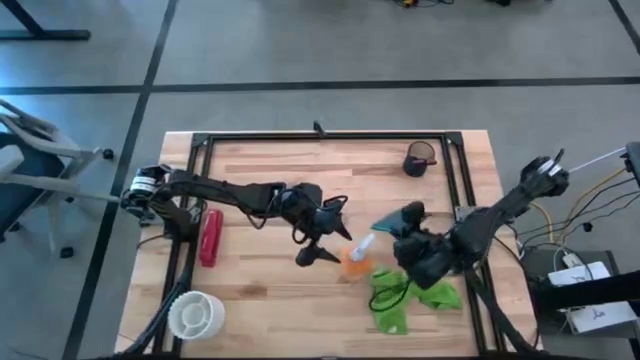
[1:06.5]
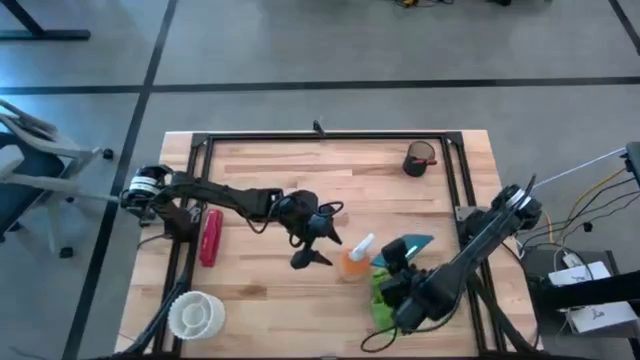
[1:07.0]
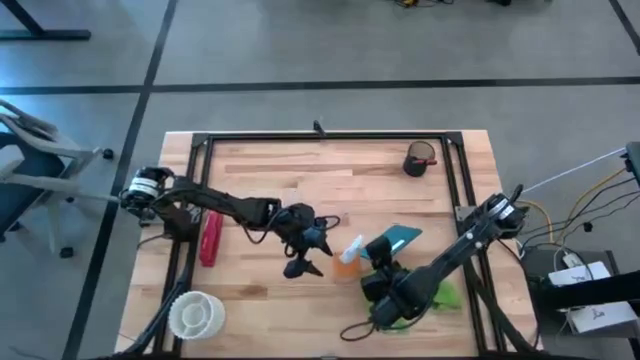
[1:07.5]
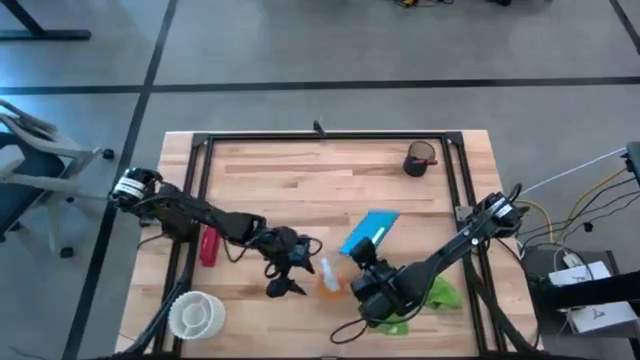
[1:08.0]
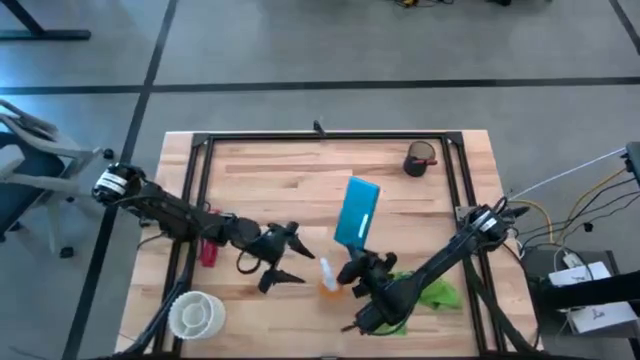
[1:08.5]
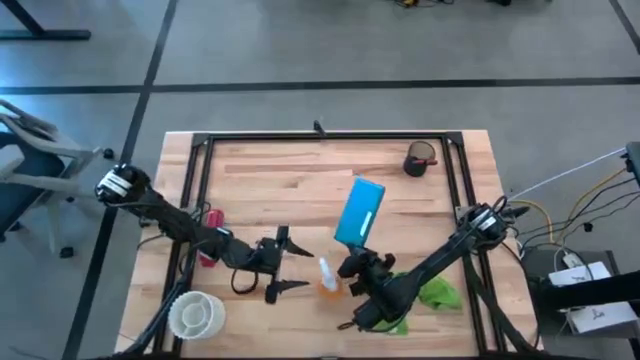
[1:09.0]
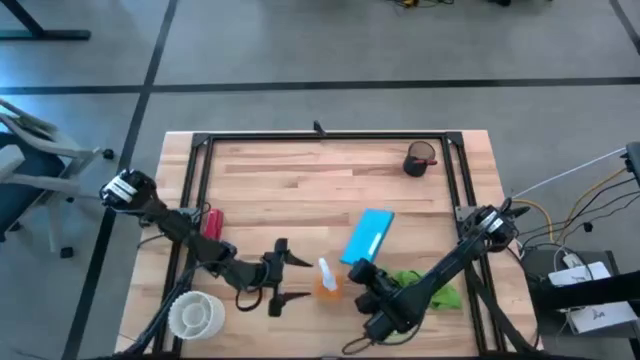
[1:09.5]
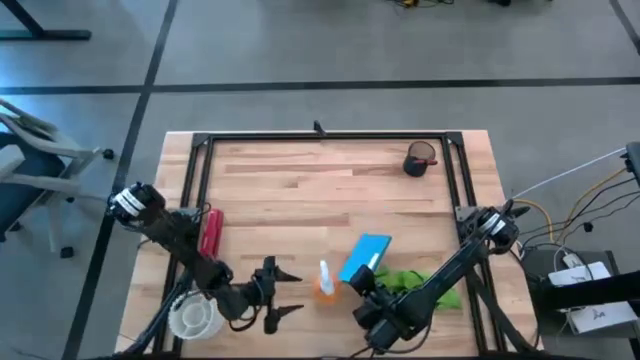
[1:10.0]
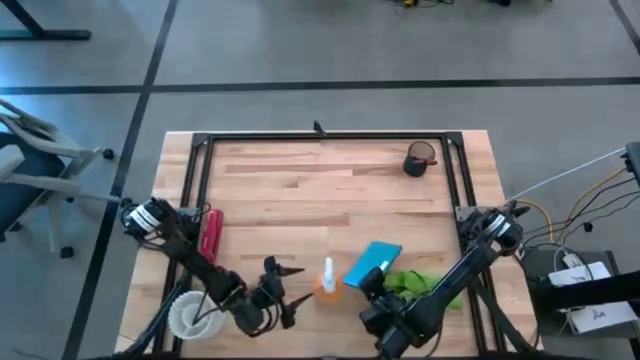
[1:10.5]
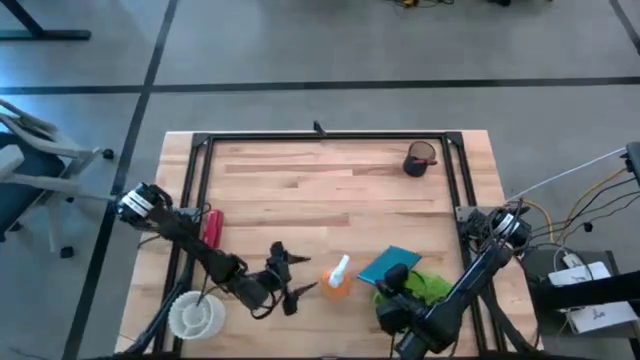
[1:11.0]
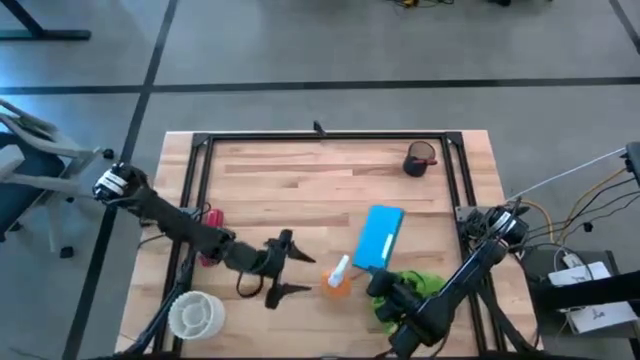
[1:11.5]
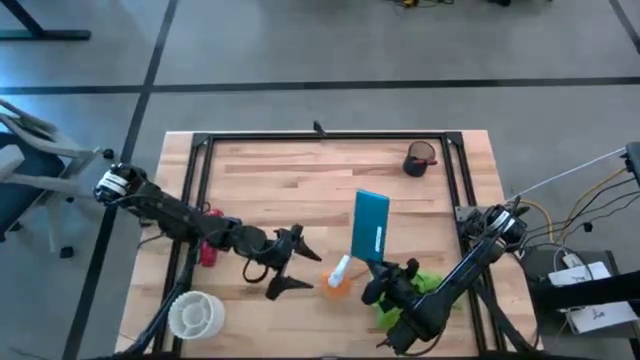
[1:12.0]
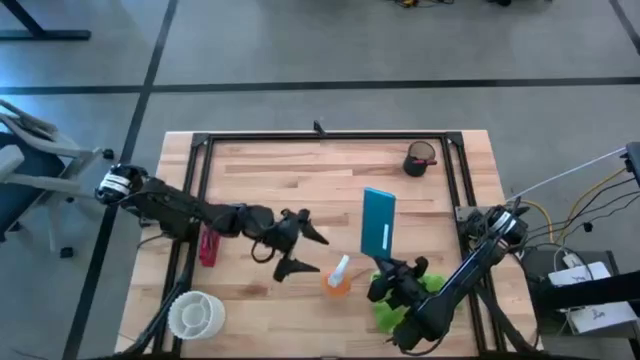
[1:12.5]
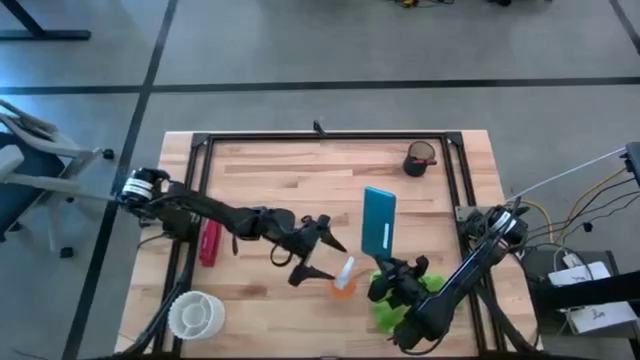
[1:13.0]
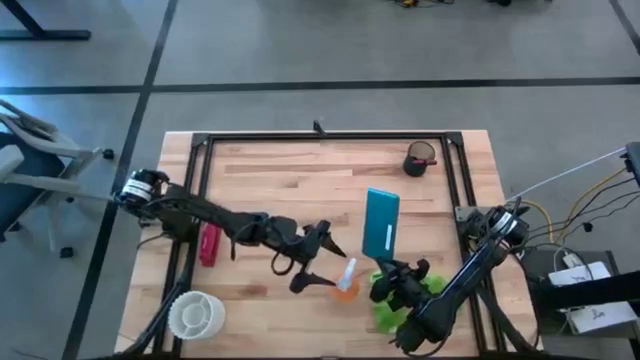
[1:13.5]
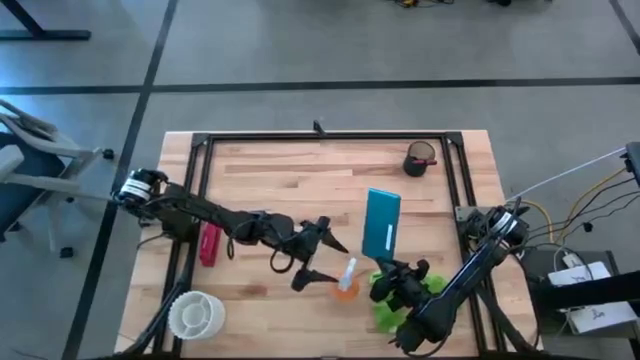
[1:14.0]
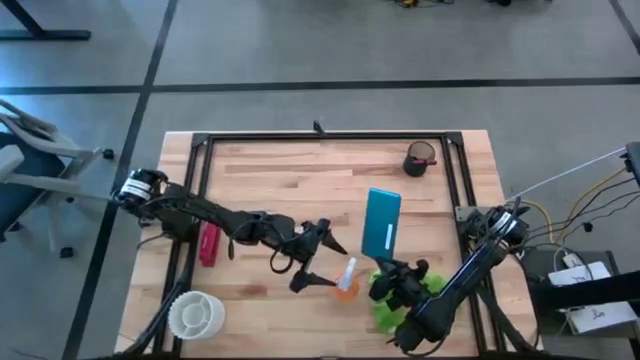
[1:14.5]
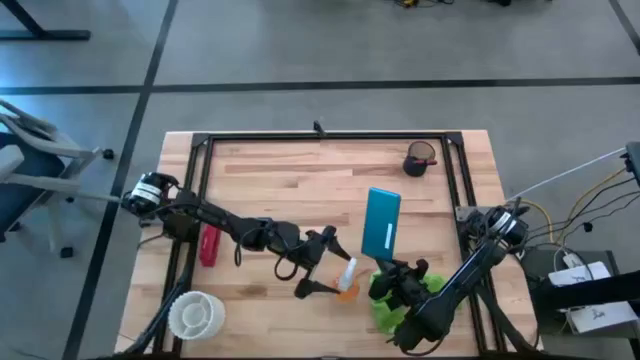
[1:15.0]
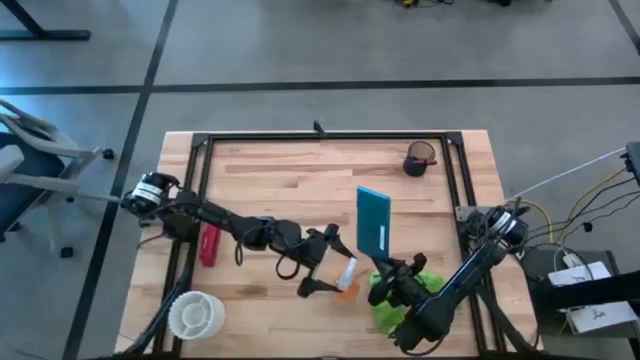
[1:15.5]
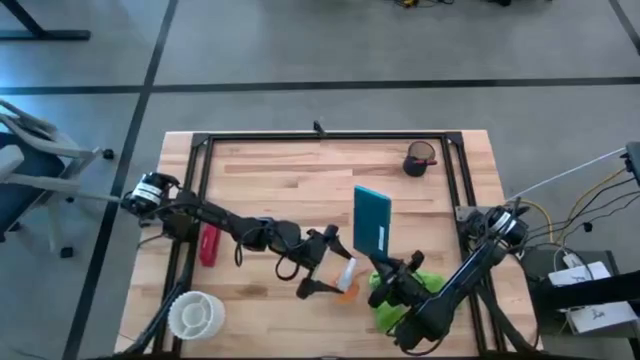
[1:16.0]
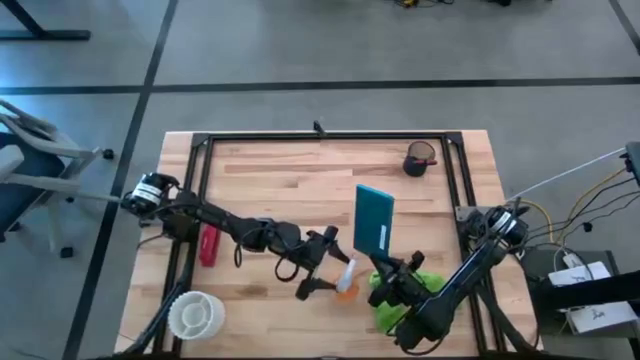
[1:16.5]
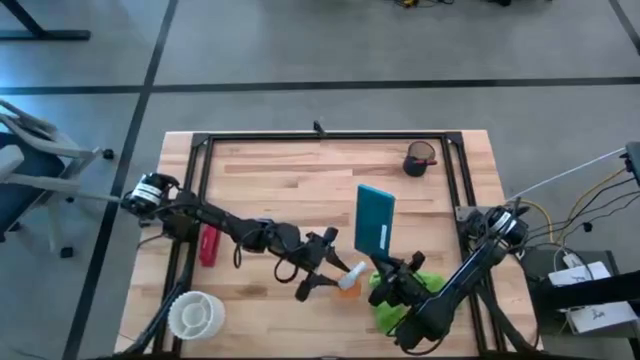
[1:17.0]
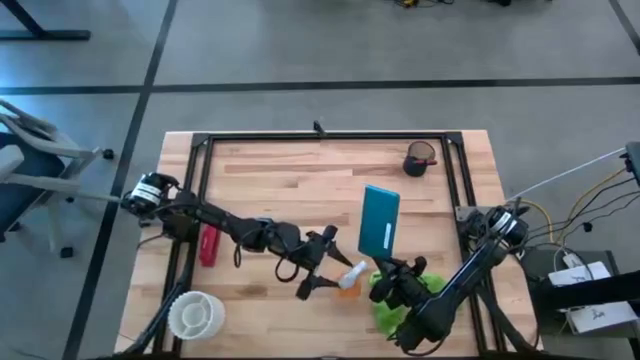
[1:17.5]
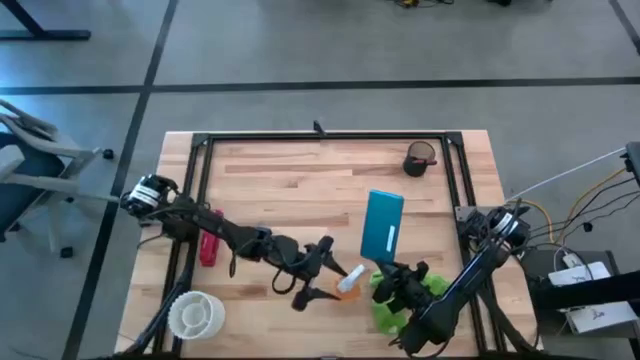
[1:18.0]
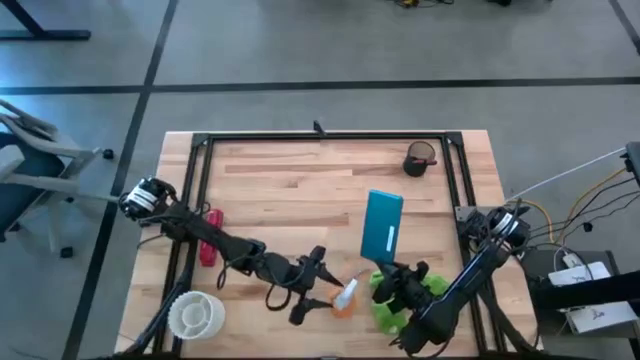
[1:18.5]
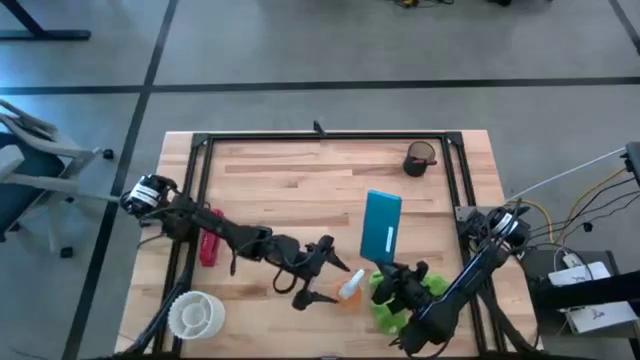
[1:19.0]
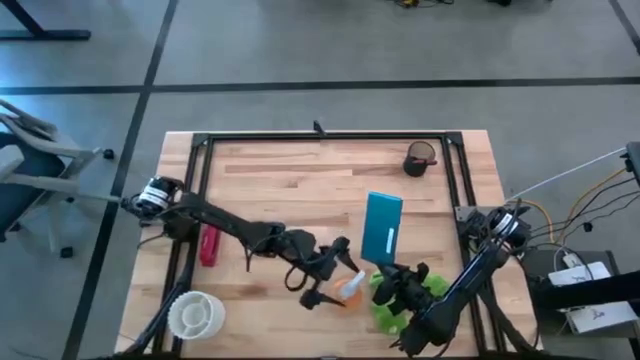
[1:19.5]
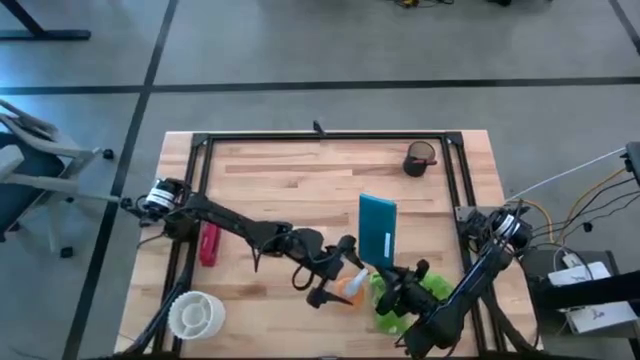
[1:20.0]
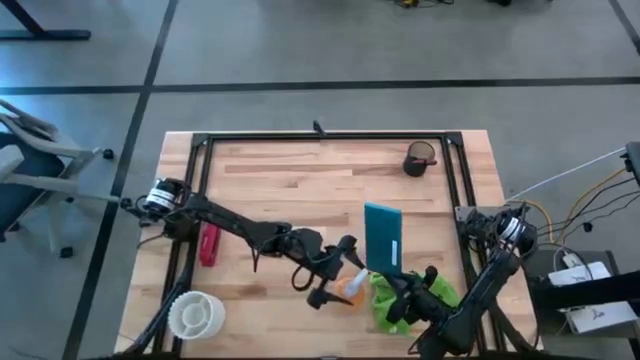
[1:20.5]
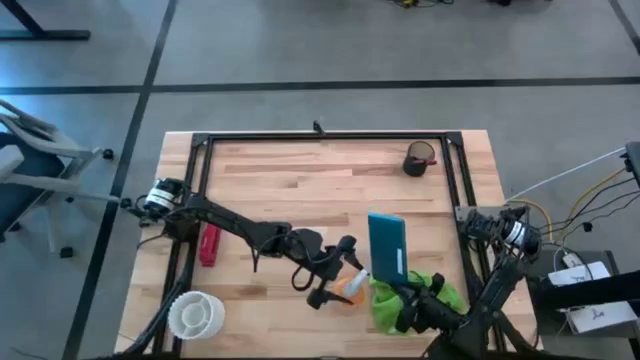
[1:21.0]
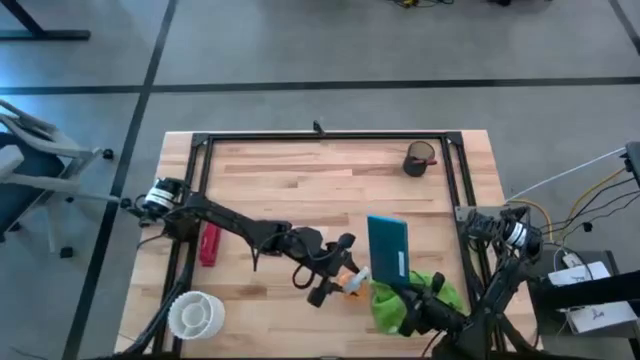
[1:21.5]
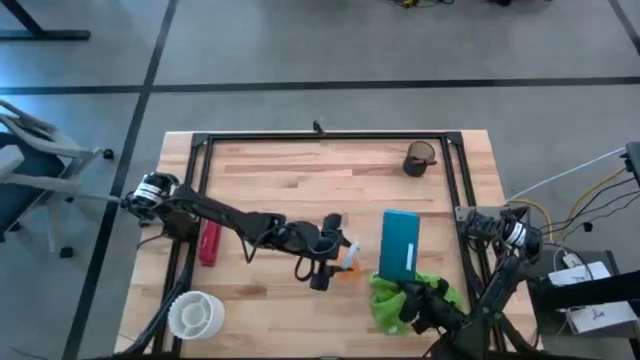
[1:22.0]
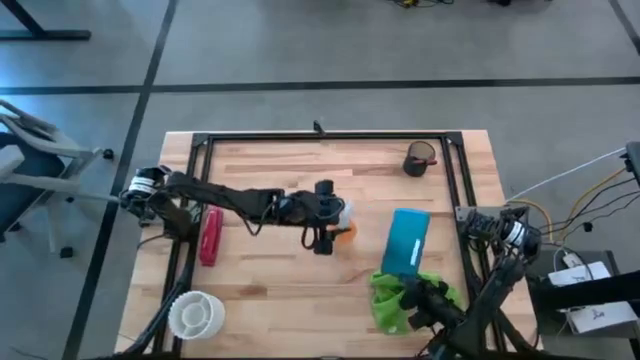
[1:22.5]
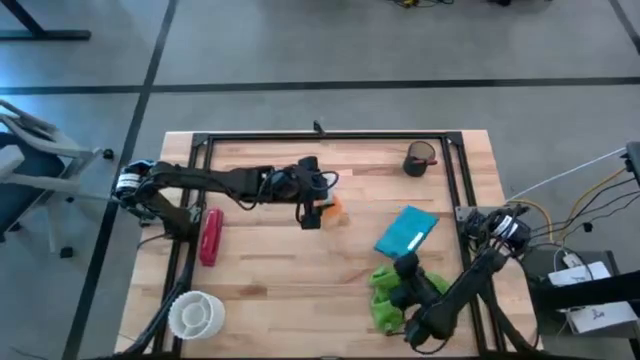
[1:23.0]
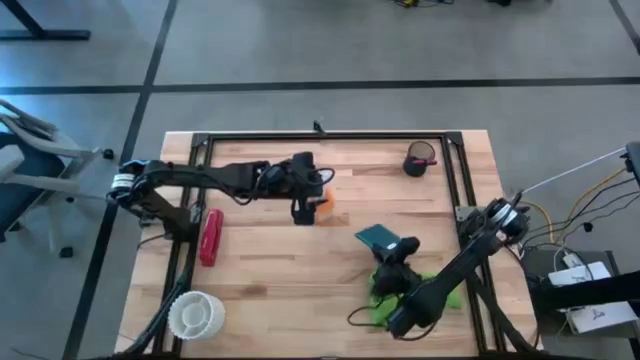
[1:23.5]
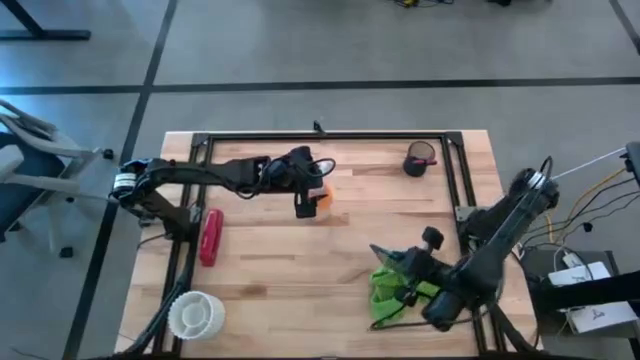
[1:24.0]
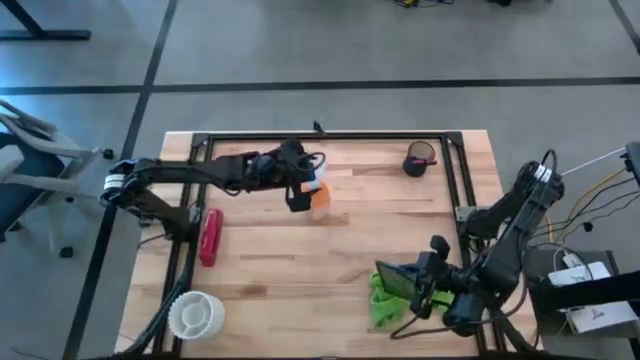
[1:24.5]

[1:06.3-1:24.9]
Task: Apply microfiber cloth
Spray the back of the blue cellphone with the yellow spray bottle

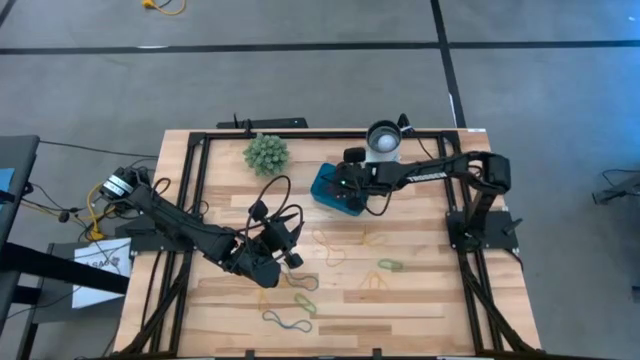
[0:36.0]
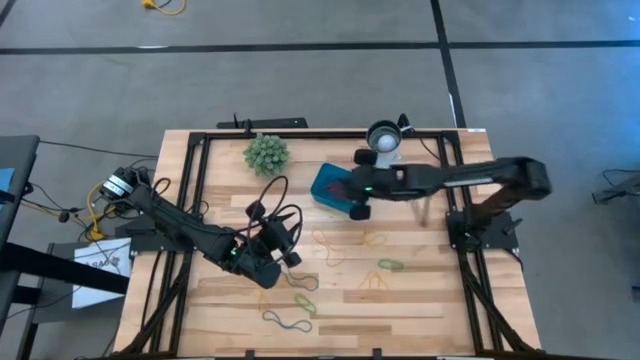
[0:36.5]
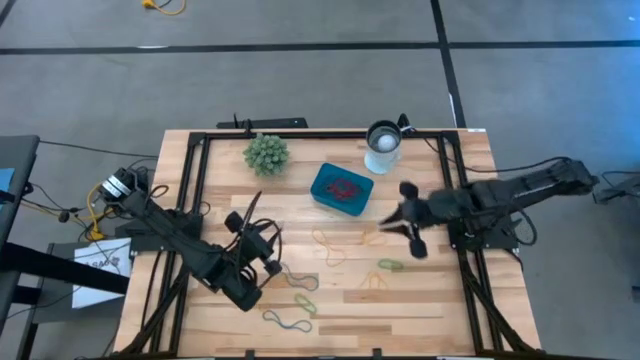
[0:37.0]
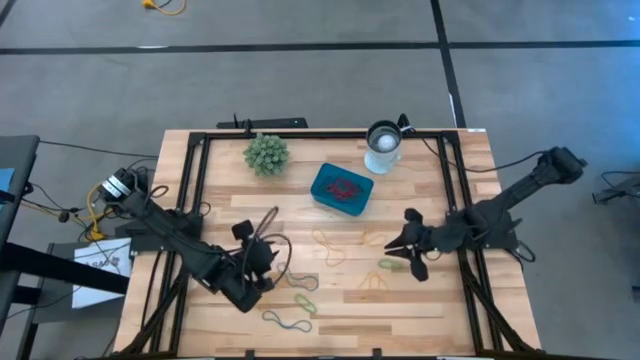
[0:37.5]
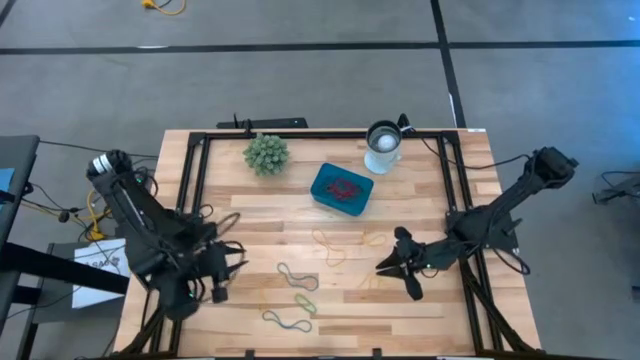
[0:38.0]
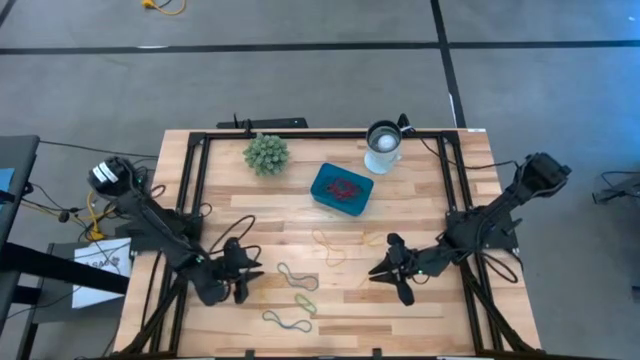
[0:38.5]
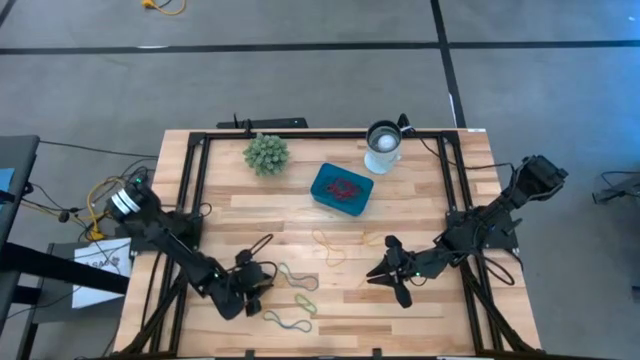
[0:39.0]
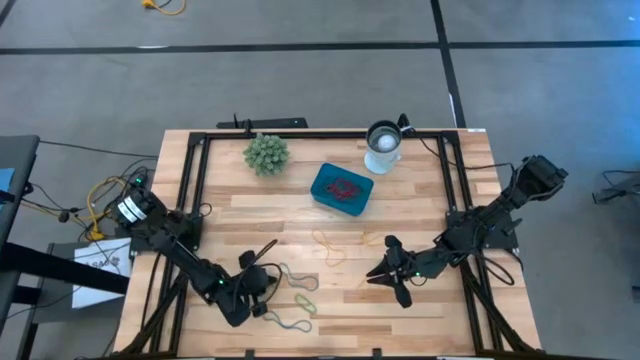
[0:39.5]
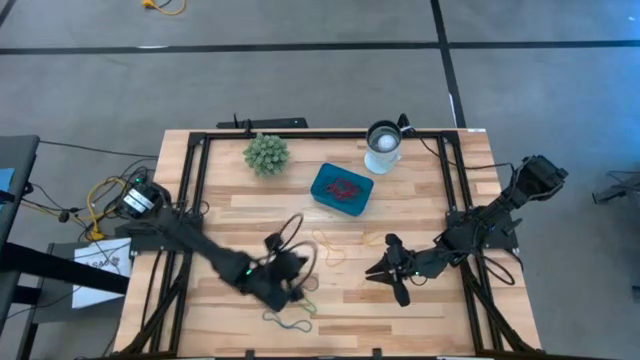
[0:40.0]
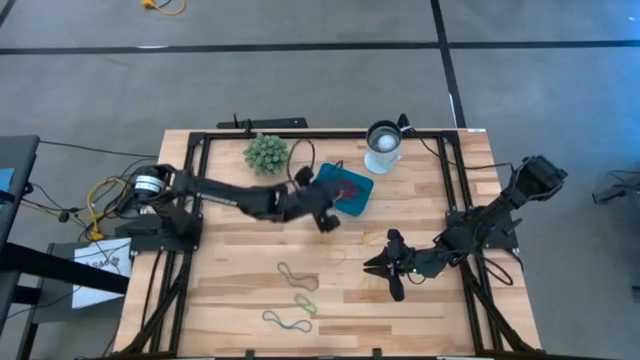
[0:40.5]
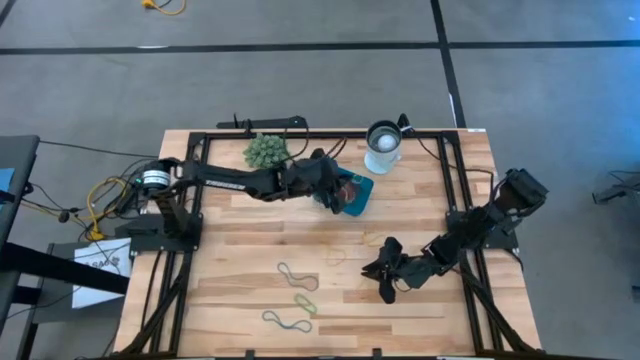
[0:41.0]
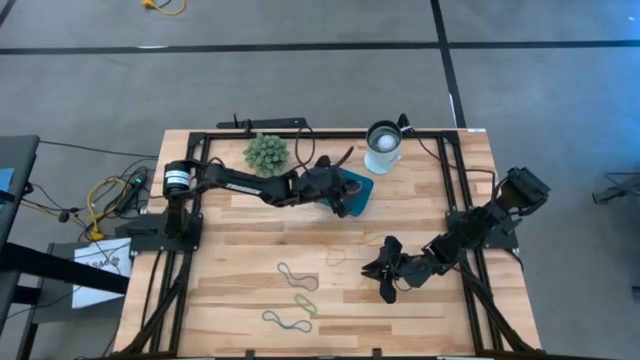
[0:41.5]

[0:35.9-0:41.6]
Task: Pick and place items into bin
Put the yellow rubber band into the blue bin
